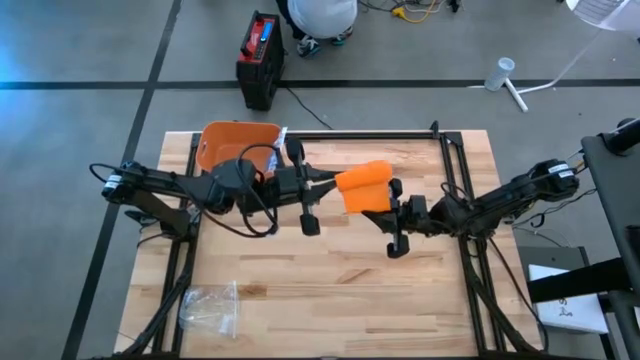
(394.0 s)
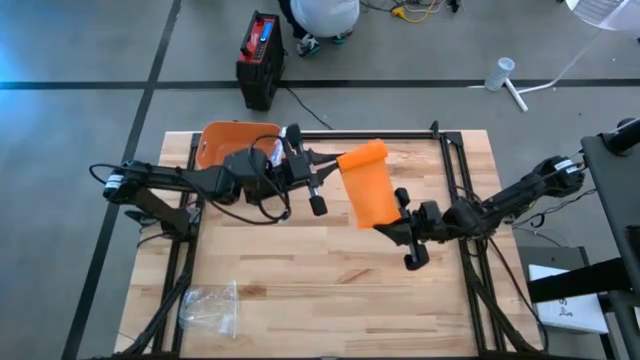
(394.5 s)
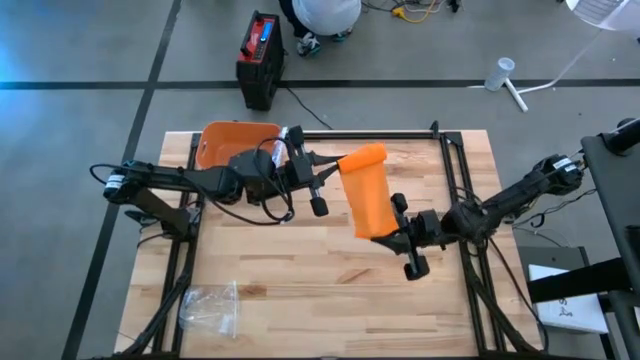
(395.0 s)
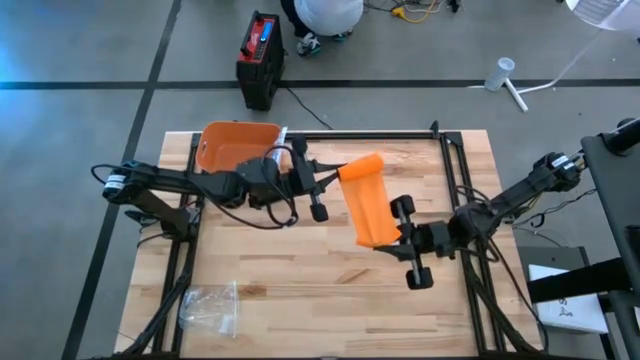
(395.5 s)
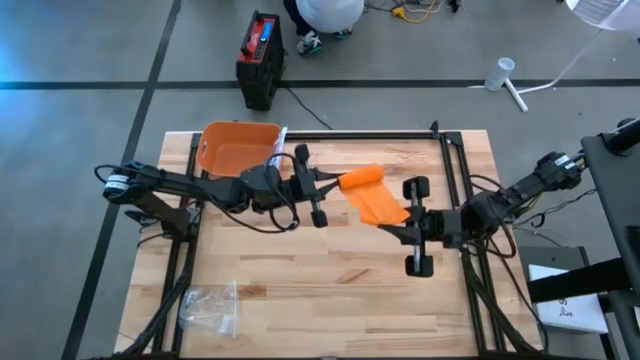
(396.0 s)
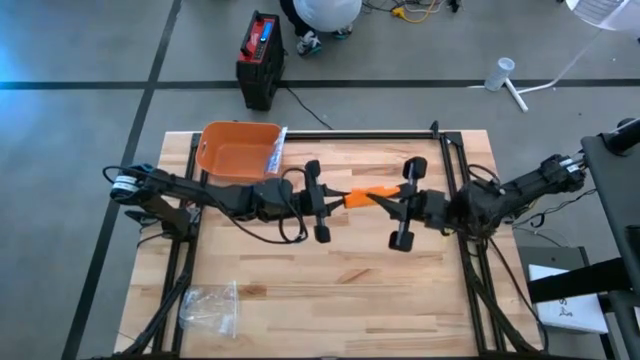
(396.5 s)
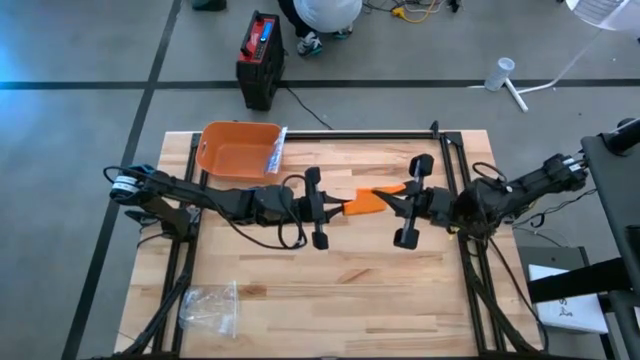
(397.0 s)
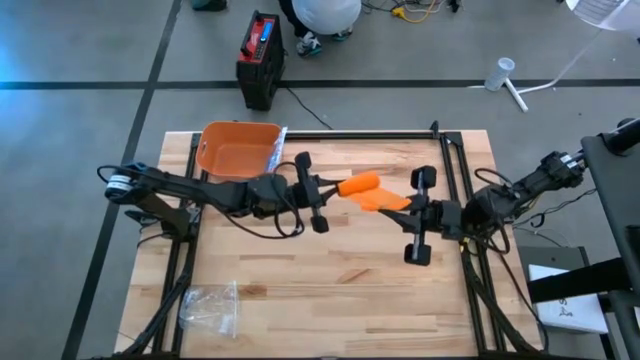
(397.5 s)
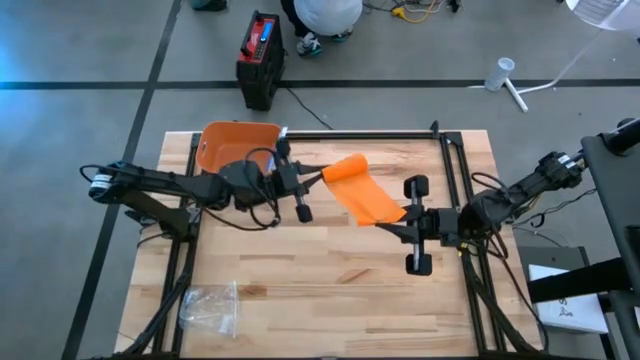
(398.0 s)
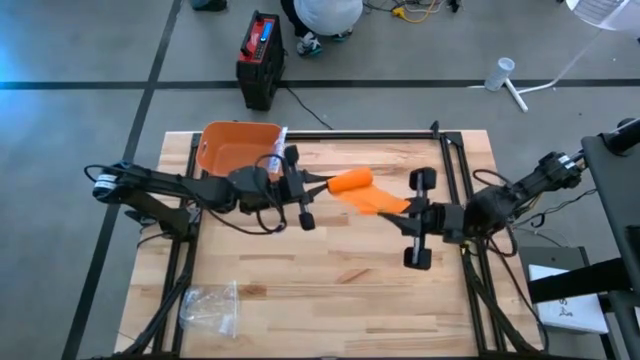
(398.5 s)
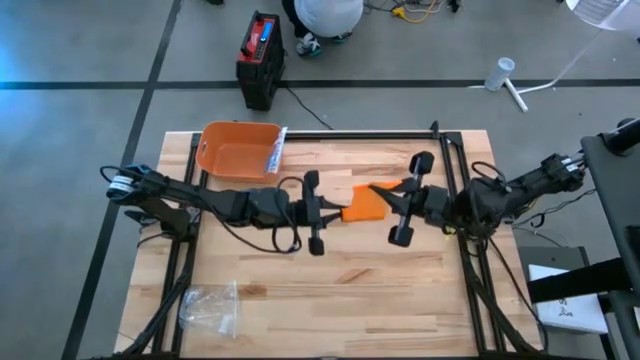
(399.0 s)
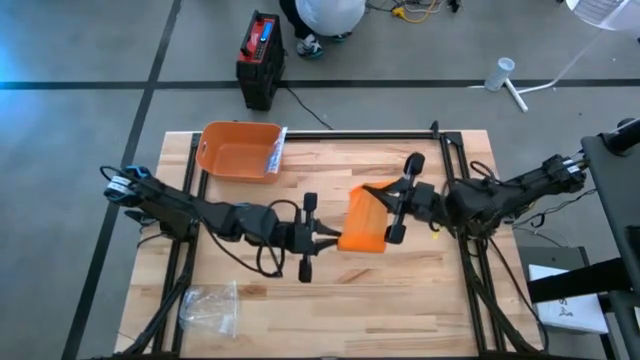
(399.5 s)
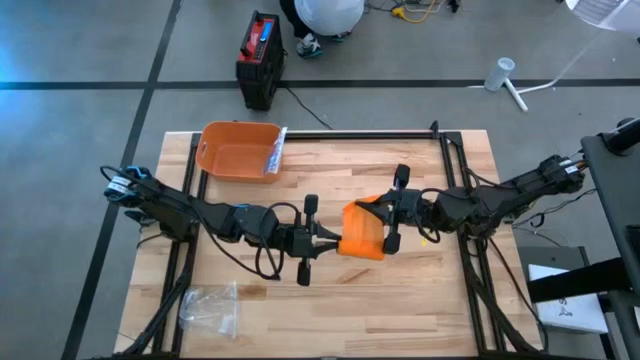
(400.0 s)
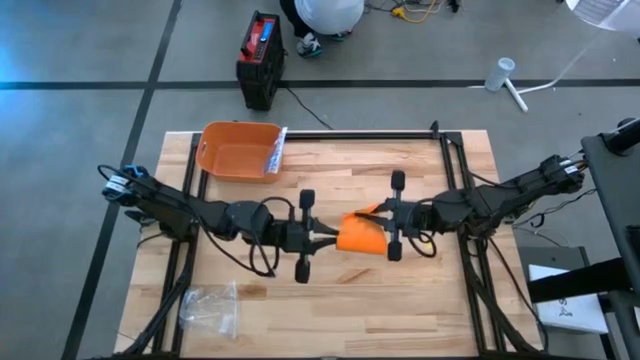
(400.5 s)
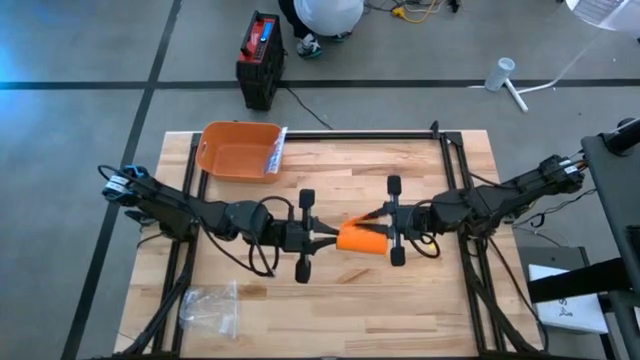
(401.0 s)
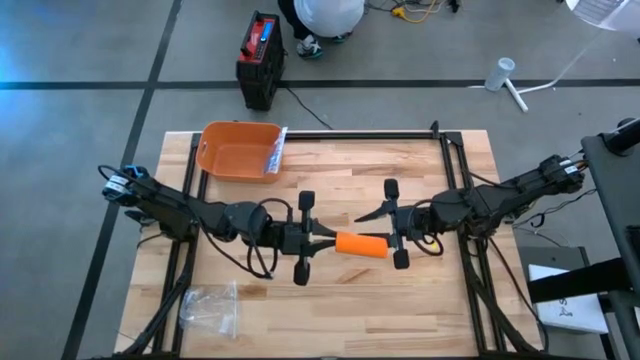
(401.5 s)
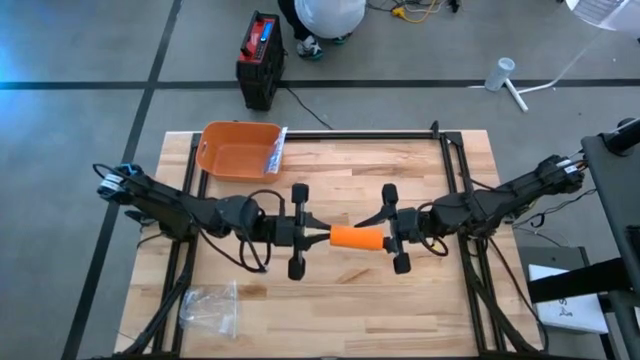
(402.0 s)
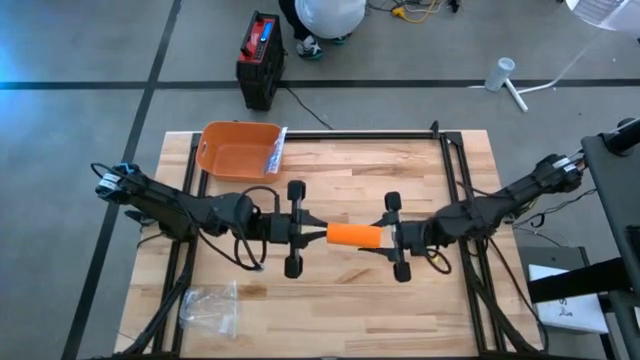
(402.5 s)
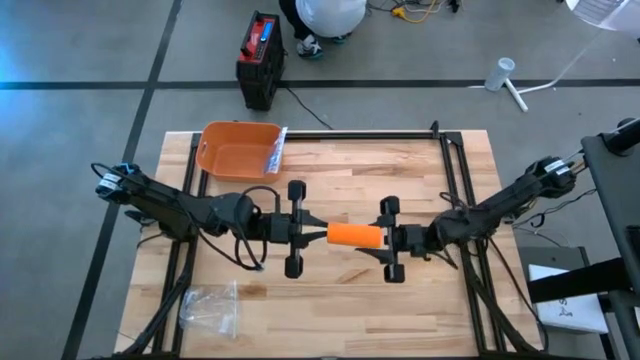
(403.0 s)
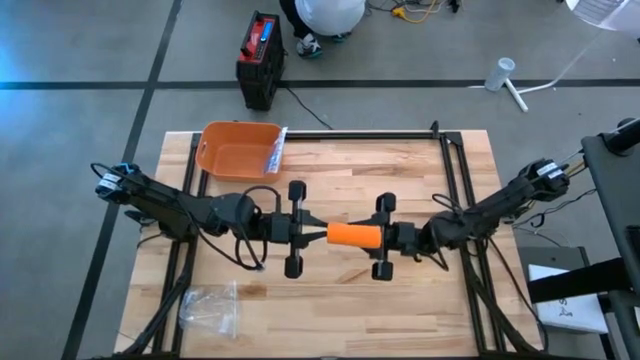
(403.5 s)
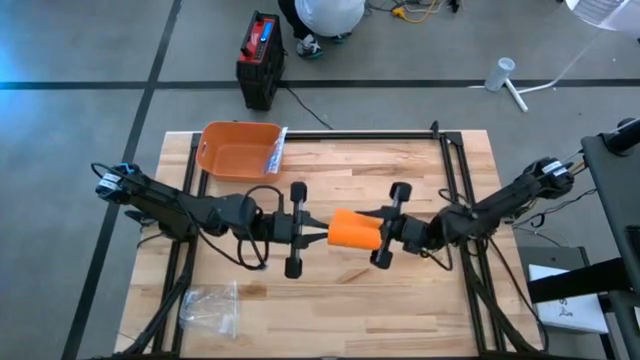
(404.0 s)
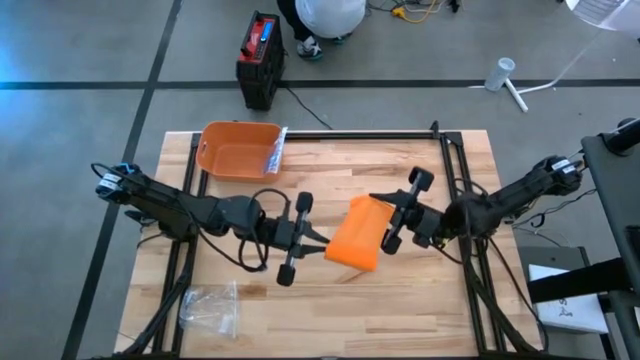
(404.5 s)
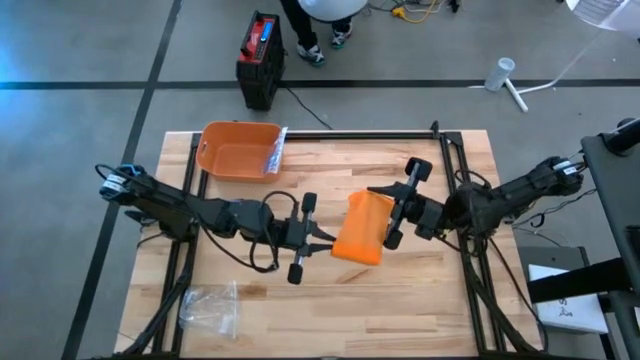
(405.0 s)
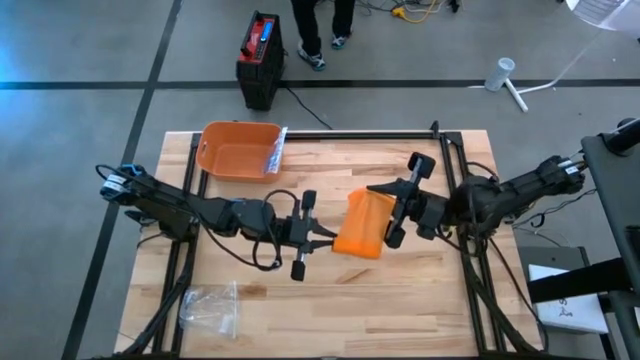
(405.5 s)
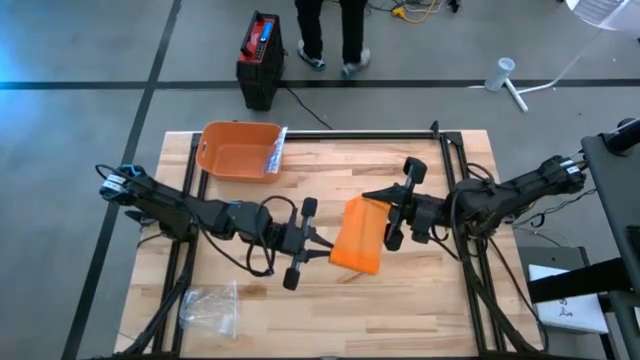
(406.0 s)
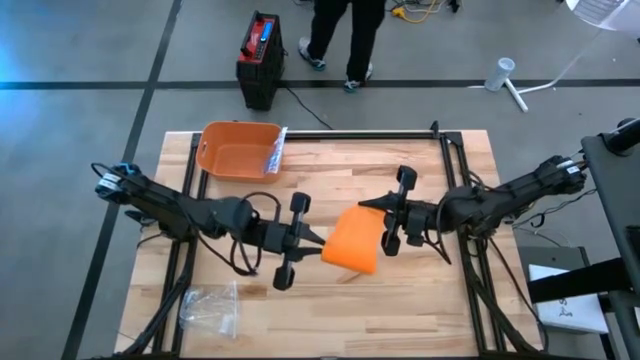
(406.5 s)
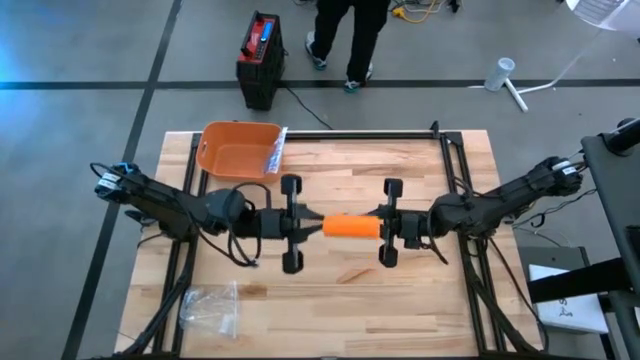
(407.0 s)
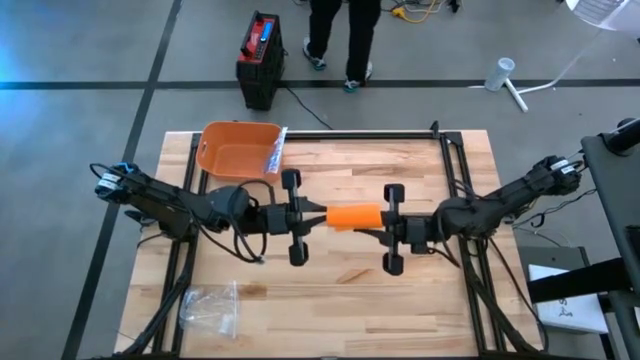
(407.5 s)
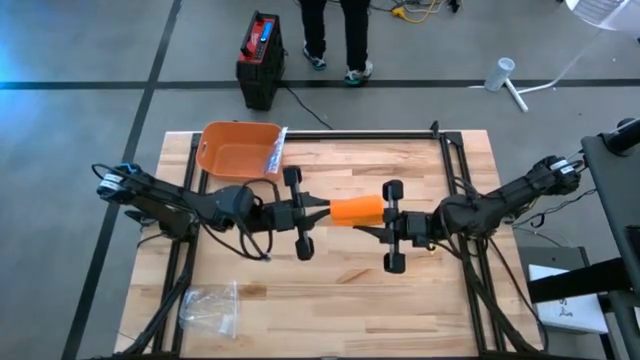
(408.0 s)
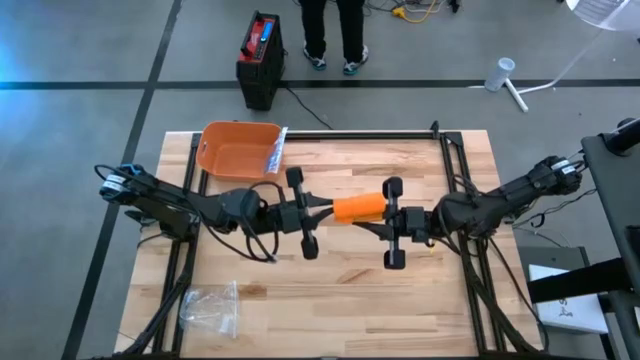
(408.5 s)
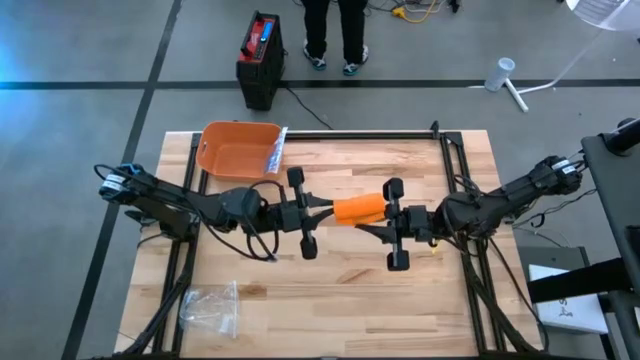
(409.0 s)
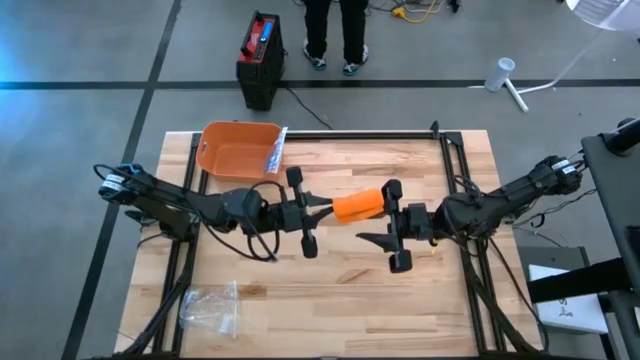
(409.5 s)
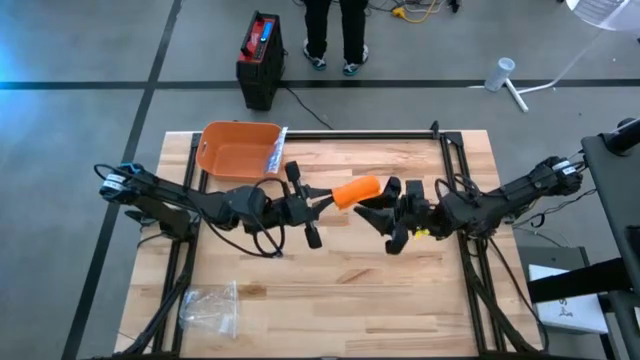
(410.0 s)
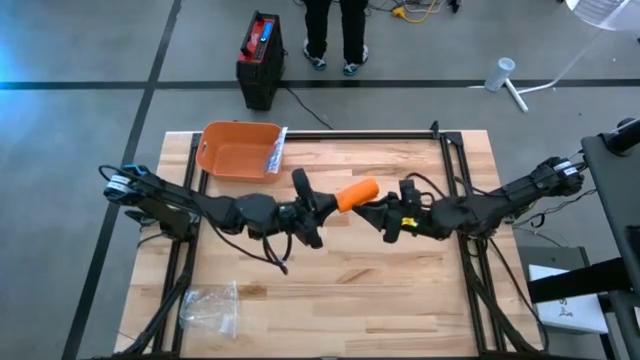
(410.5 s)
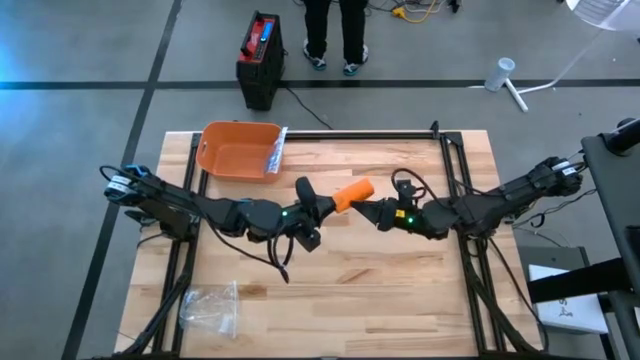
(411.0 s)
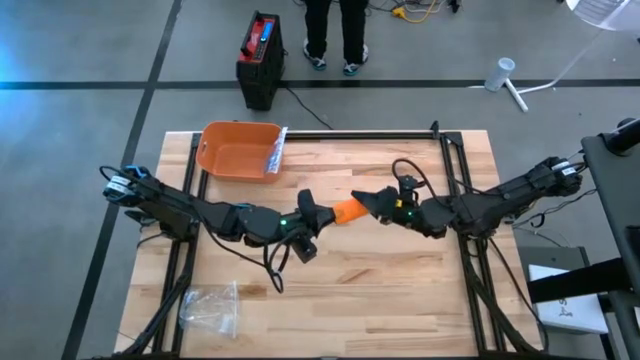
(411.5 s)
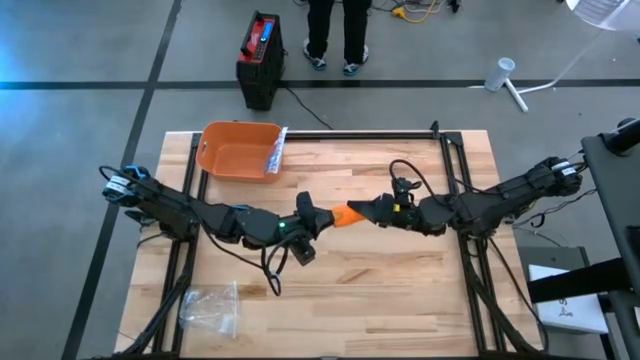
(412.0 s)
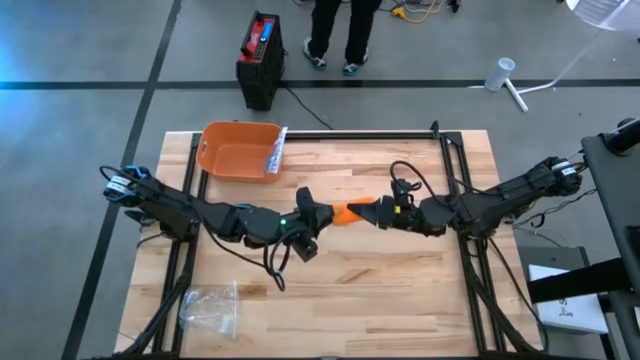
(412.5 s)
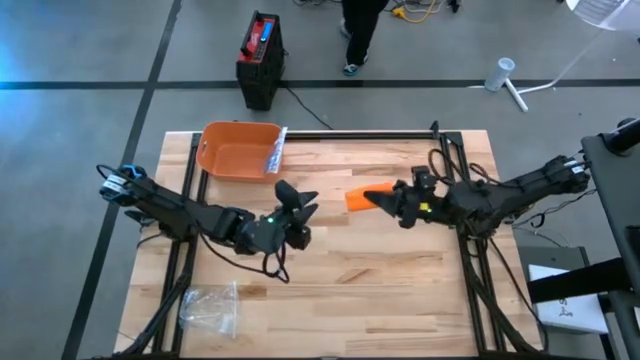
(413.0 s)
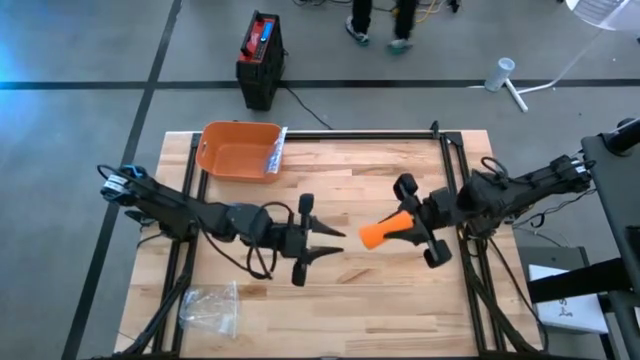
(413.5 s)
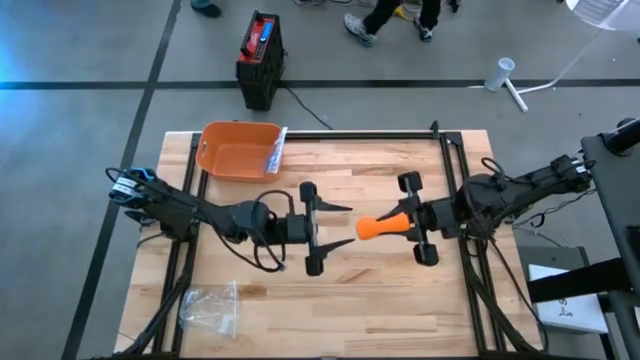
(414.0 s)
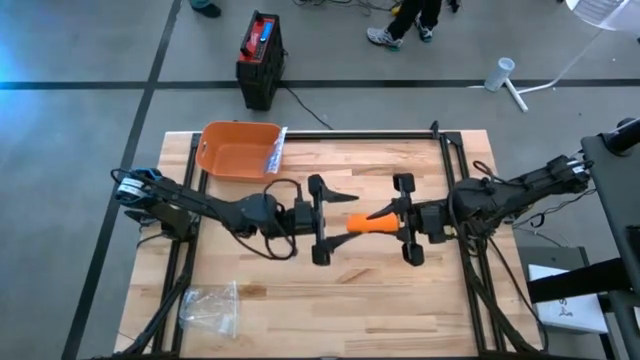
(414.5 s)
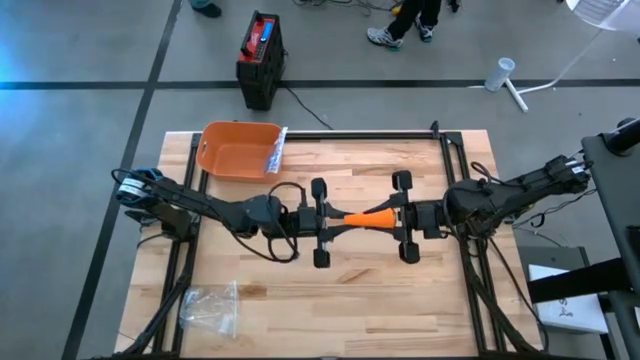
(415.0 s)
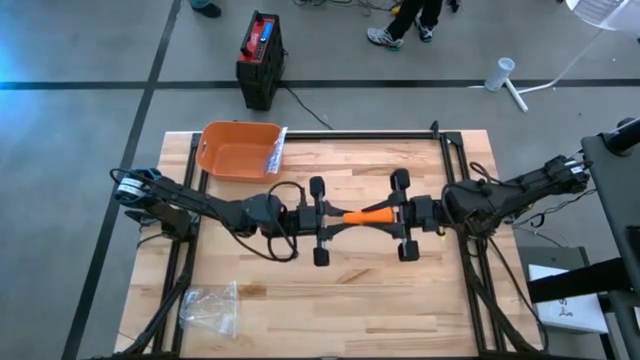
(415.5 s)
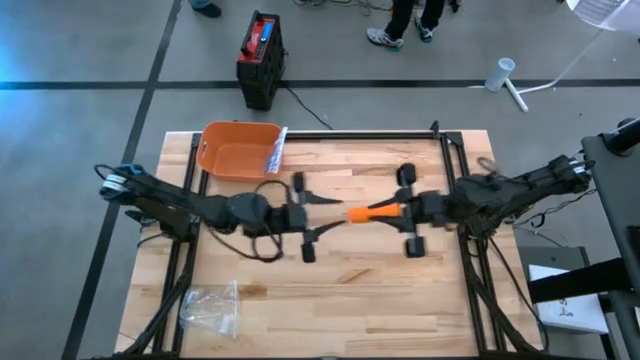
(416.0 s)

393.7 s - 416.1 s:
Task: Roll bandage
Roll the orange bandage
